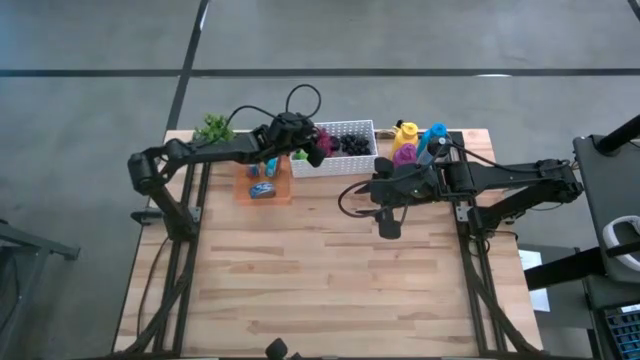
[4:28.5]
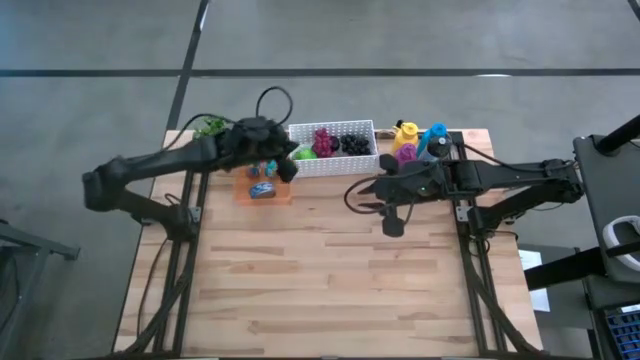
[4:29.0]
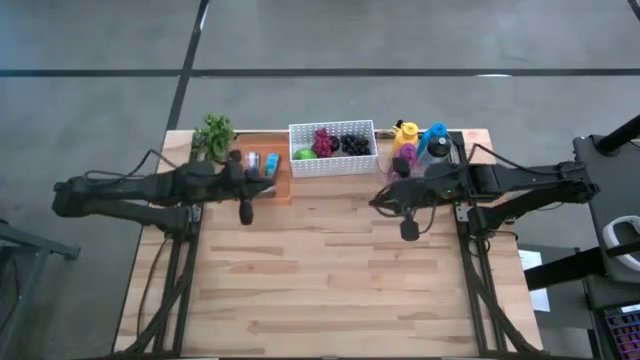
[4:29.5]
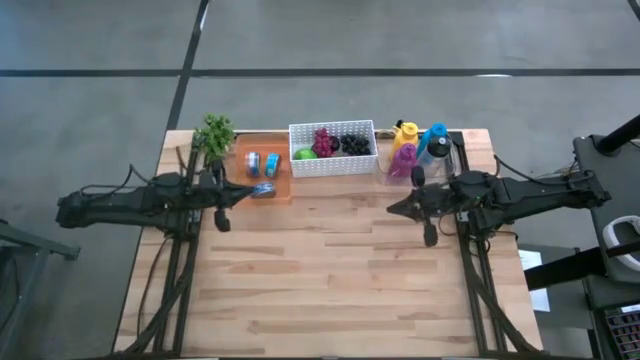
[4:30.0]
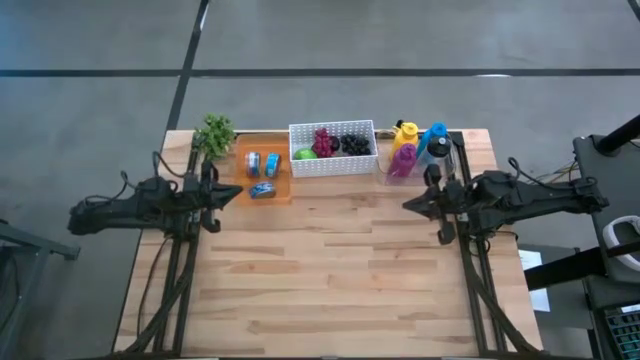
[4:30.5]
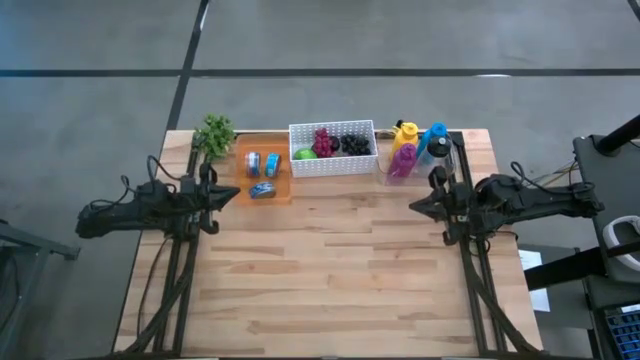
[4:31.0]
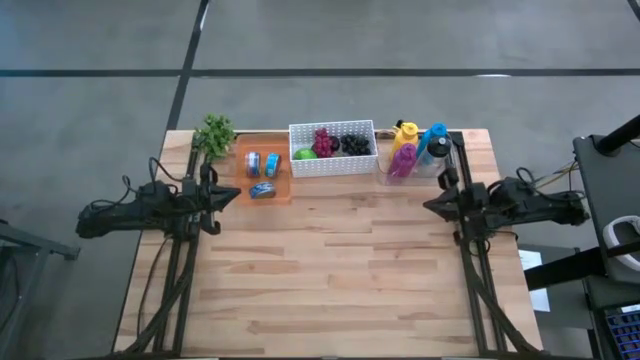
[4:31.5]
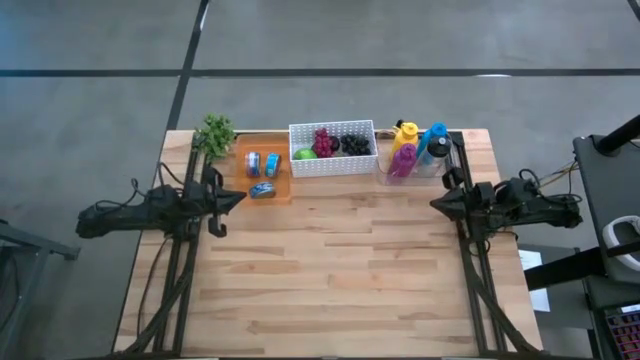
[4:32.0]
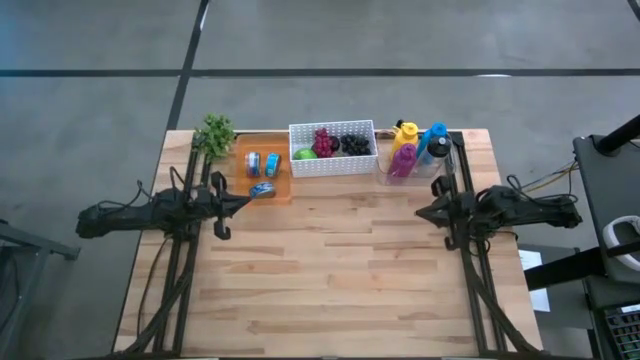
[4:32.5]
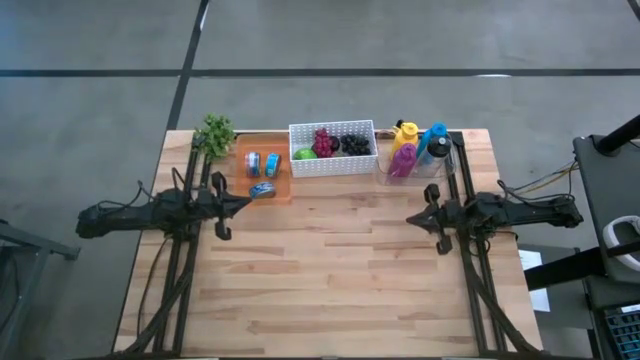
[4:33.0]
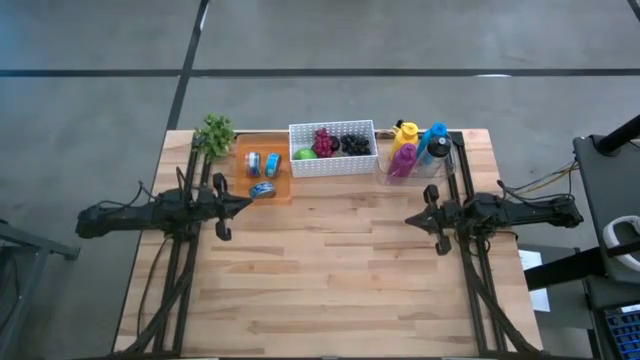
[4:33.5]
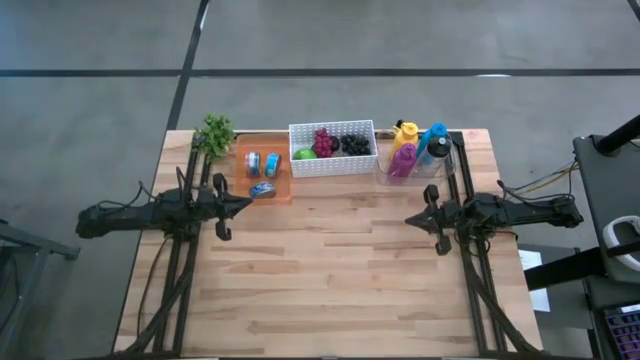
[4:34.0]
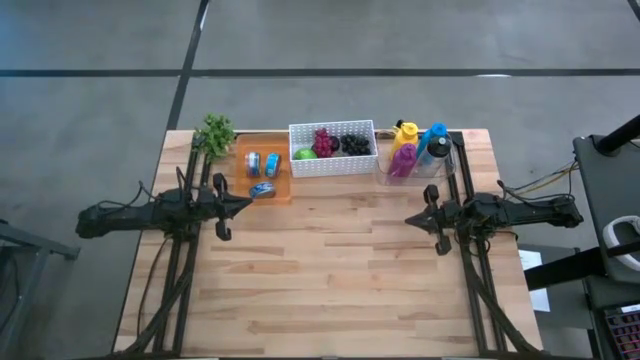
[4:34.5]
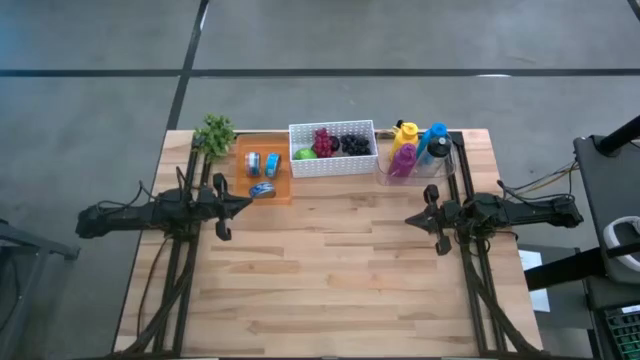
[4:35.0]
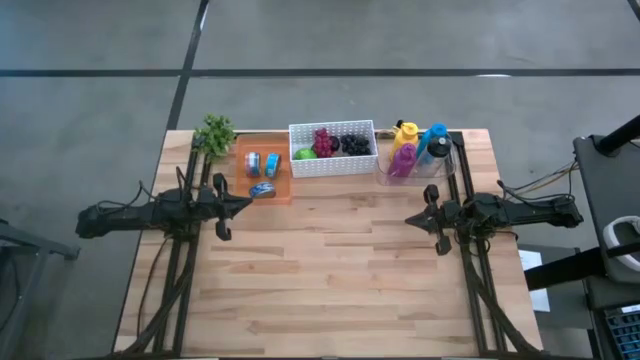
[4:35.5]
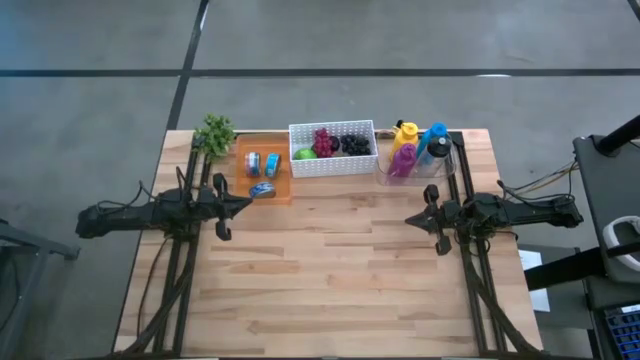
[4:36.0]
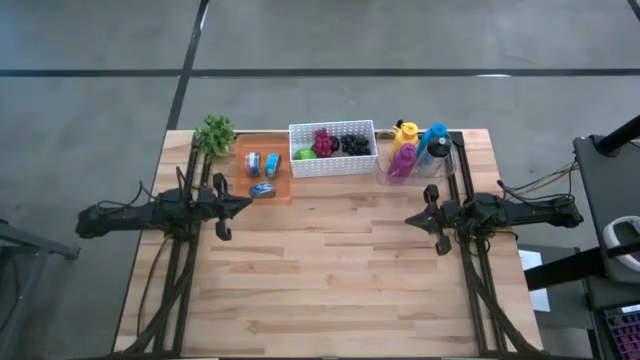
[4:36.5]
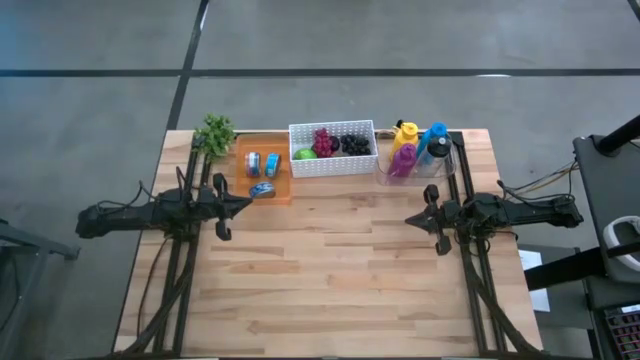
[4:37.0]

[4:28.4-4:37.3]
Task: Pick & Place Food Item
Return to Home Position

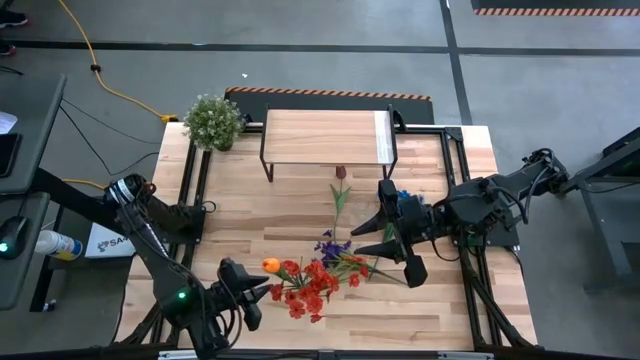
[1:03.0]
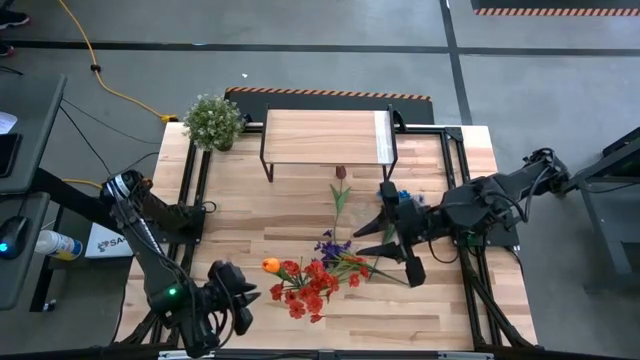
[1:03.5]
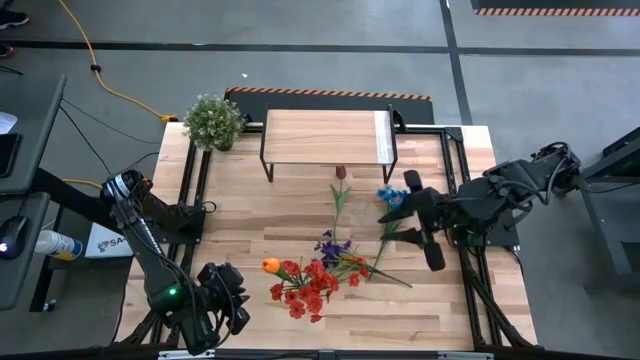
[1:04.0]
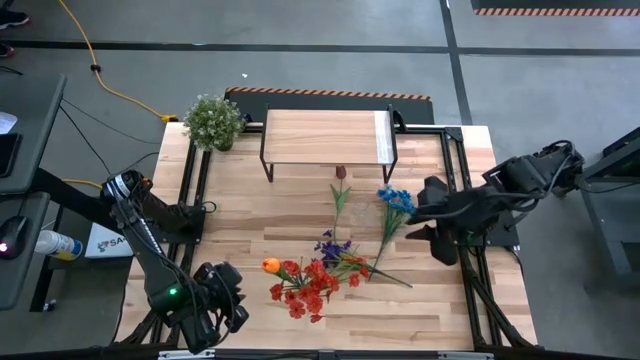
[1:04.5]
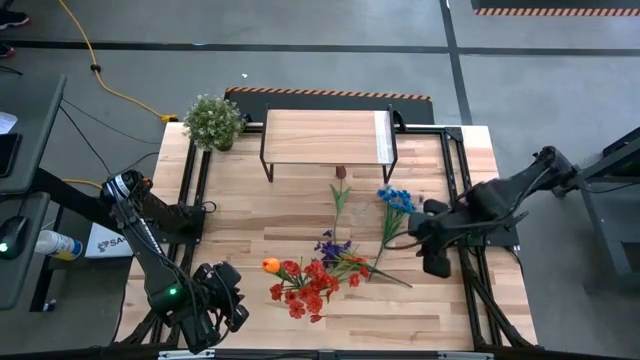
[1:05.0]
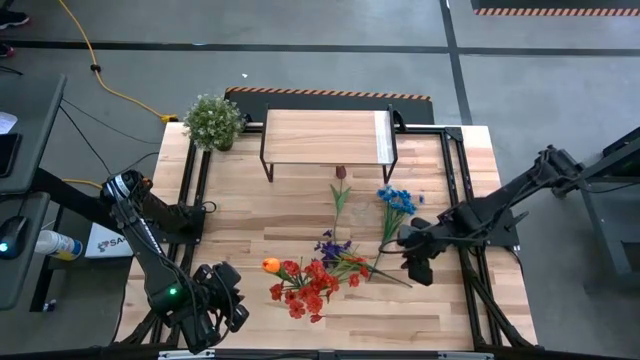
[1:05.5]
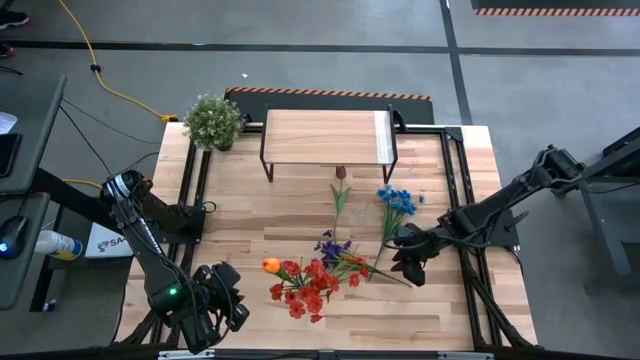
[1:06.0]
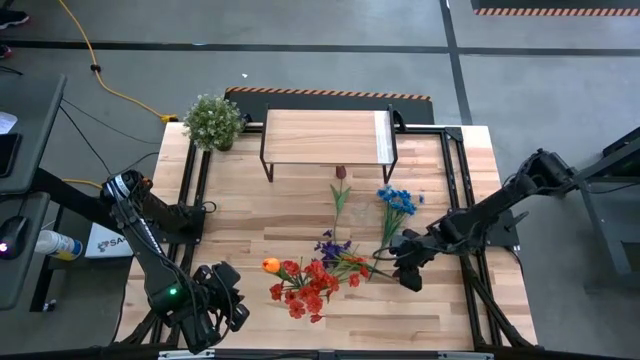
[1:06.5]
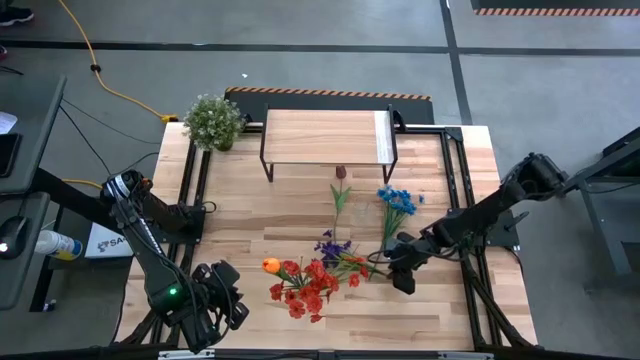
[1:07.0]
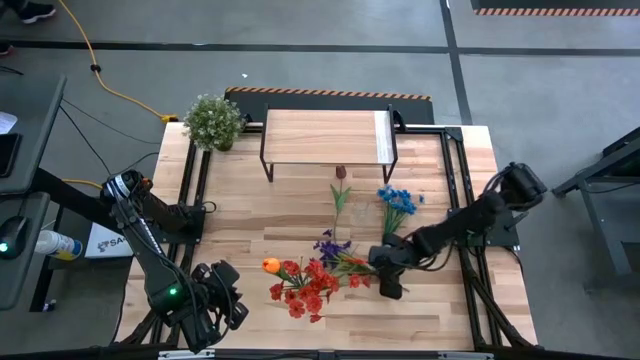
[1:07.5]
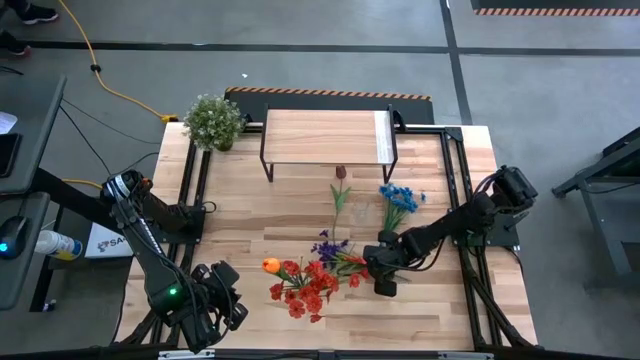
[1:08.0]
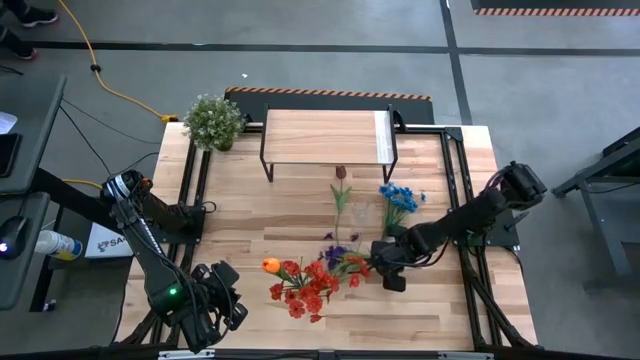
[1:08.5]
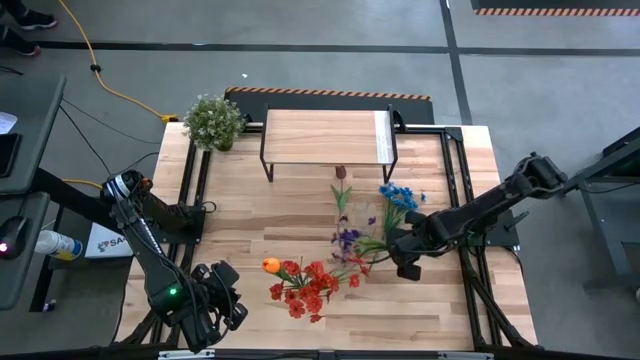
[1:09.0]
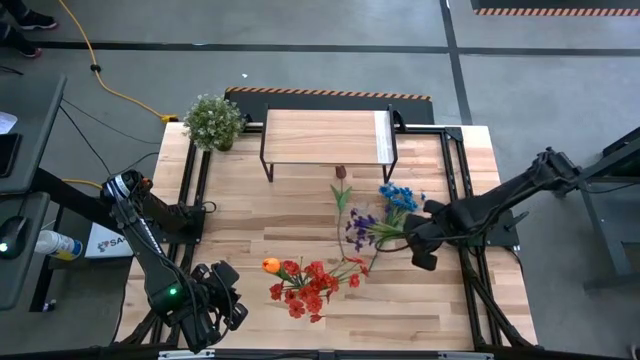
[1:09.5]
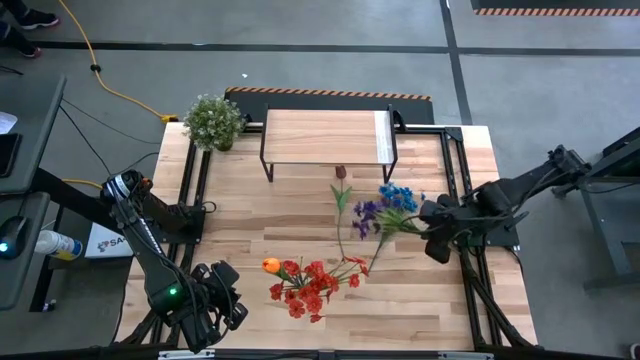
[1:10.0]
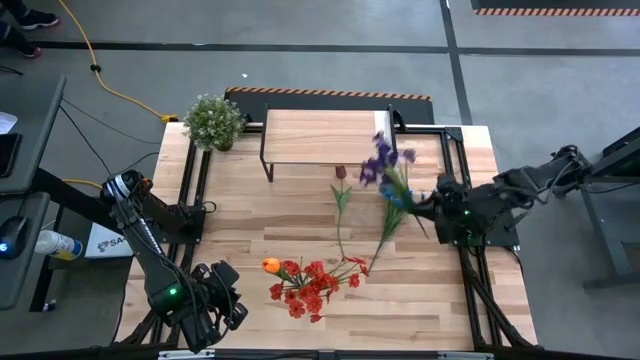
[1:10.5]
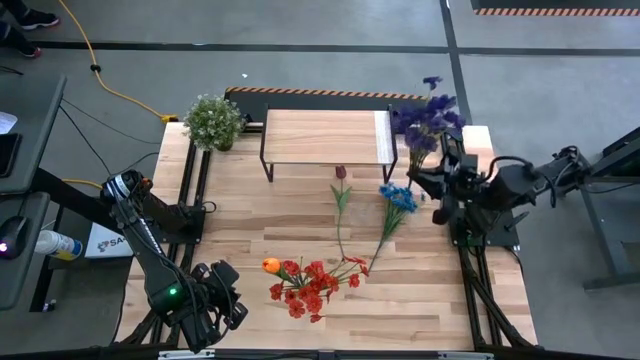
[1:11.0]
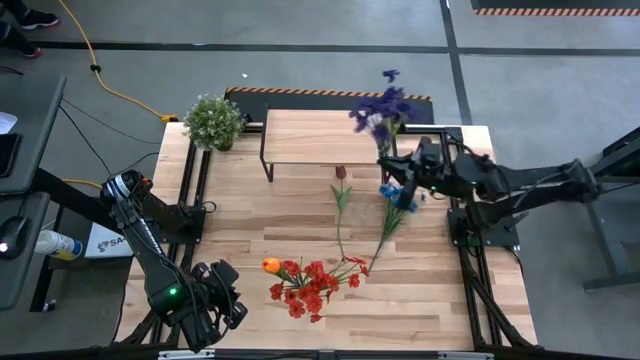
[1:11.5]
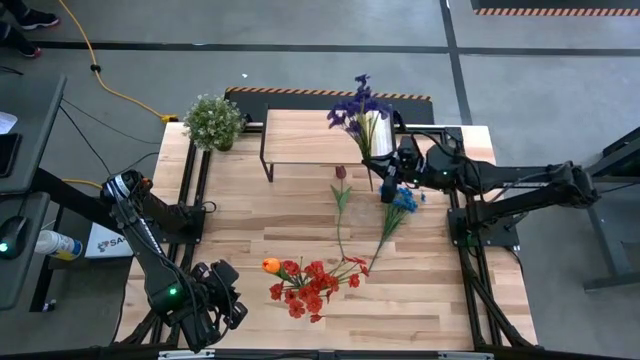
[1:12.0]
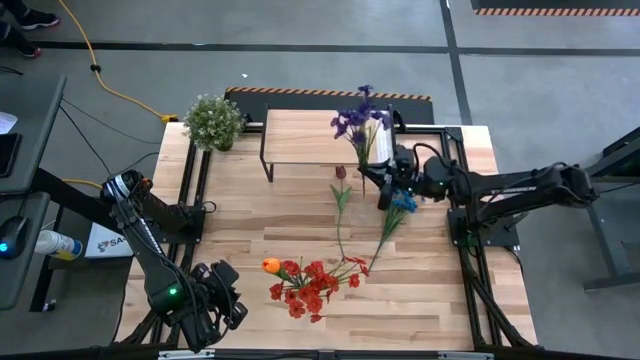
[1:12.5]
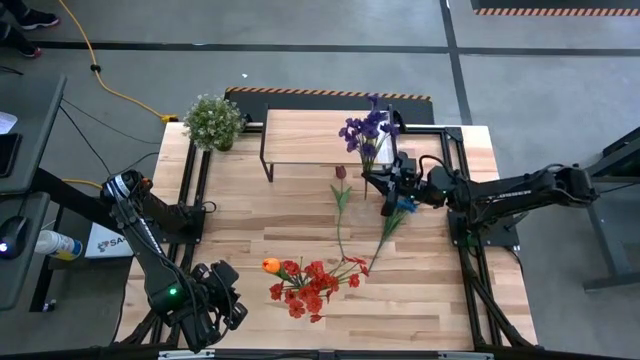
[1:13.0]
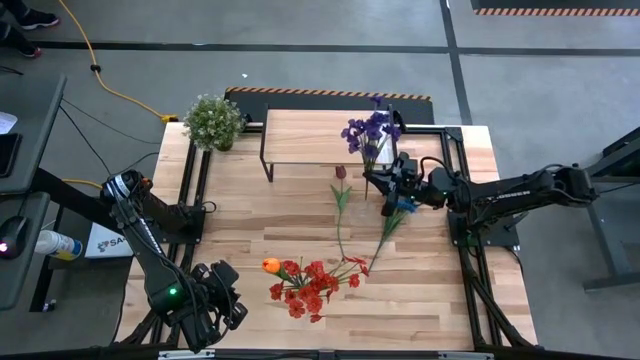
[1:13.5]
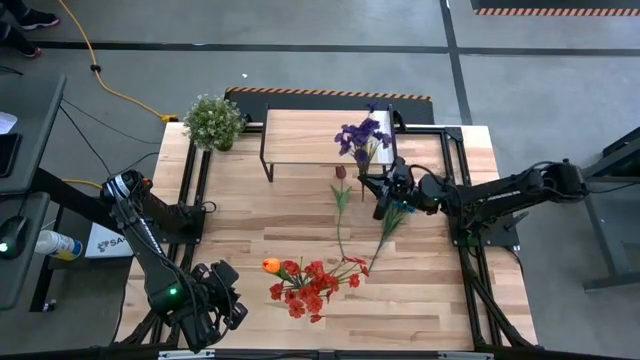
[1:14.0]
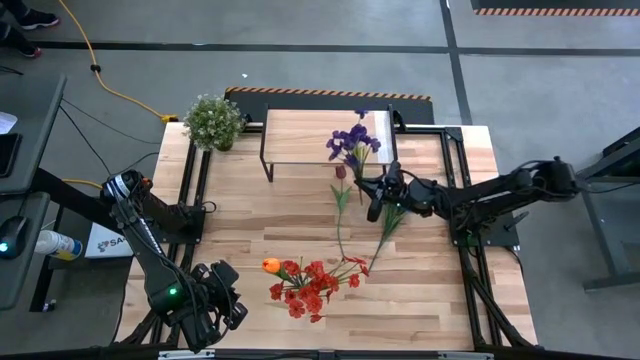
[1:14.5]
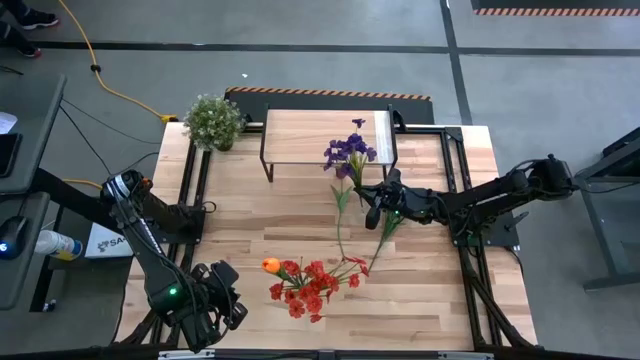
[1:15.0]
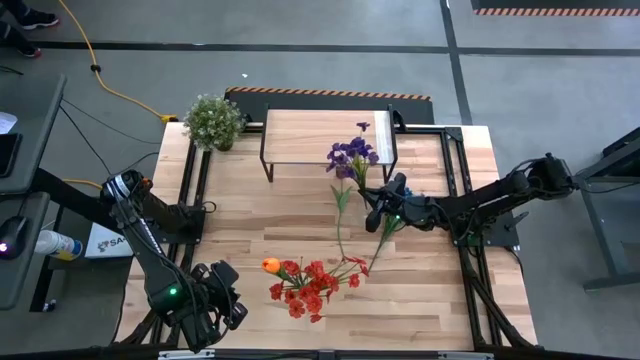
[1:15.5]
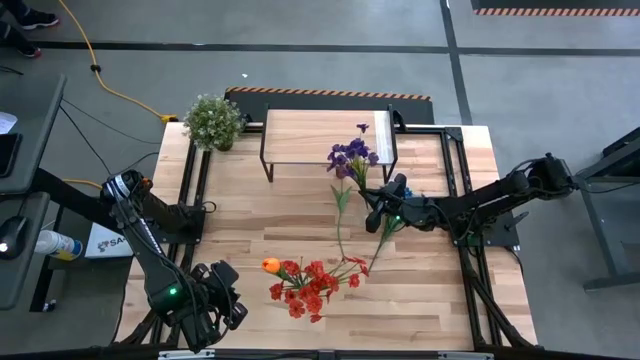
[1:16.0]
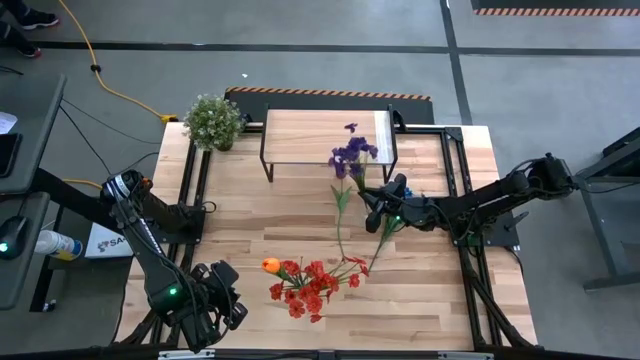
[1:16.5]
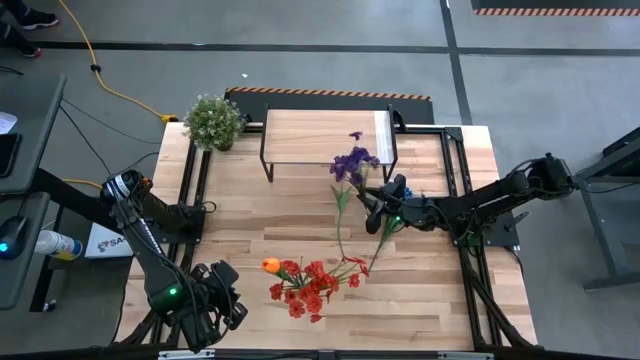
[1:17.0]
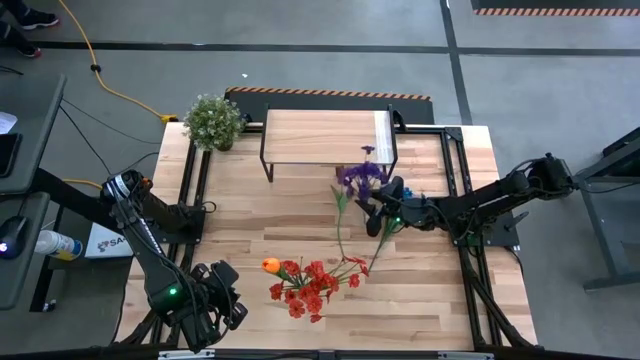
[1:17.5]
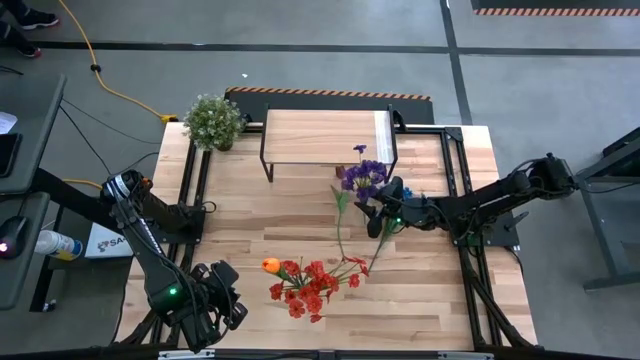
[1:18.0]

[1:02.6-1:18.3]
Task: Pick and place flowers into a vace then onto a shelf
Put the violet flowers into the top transparent vase
